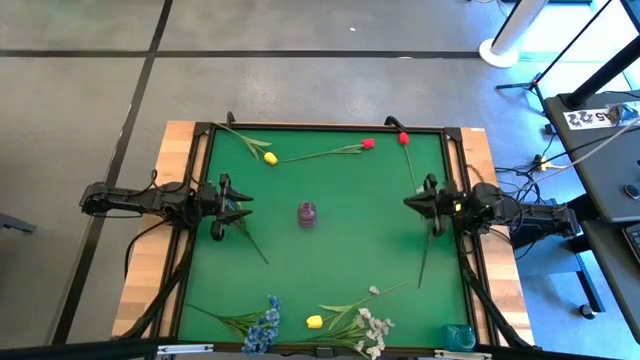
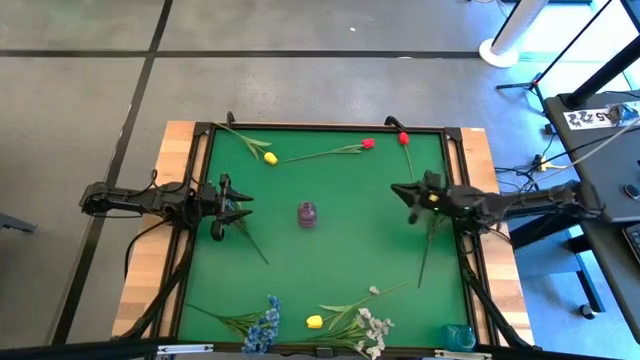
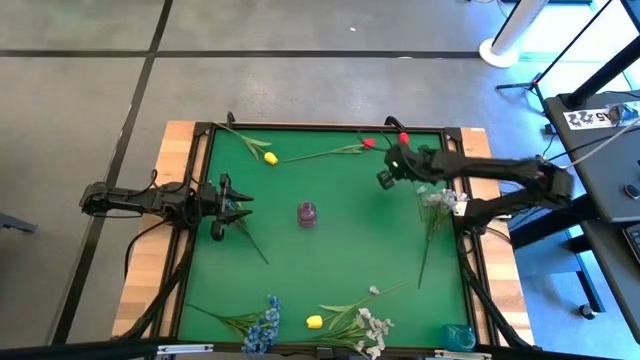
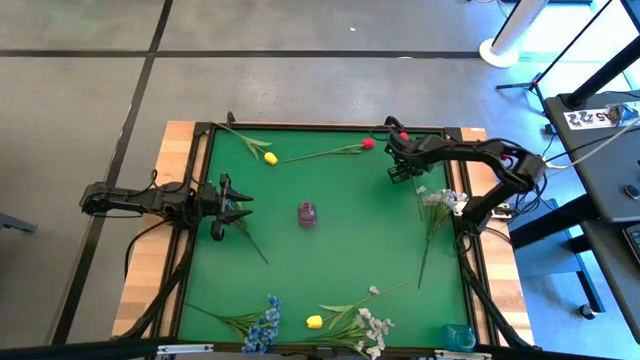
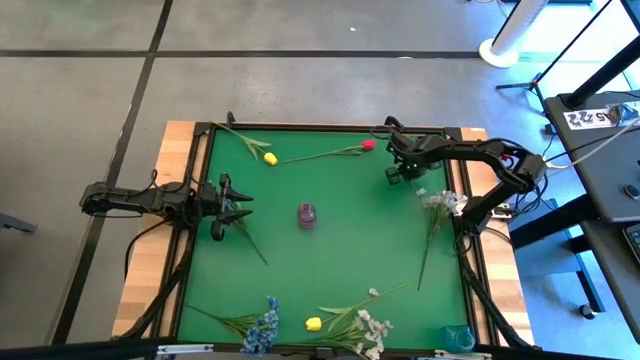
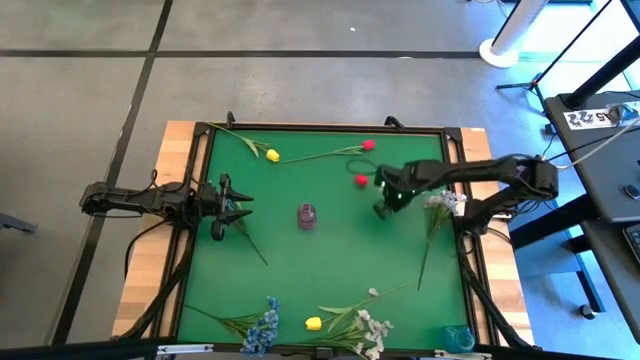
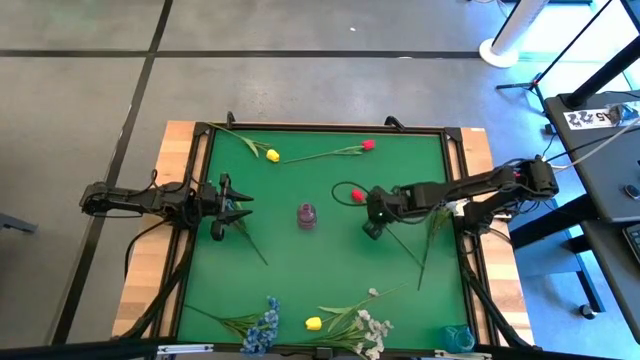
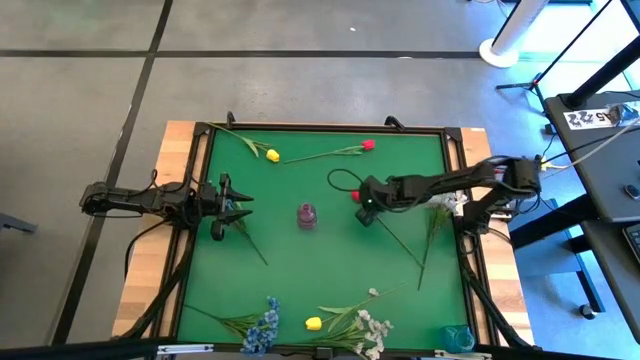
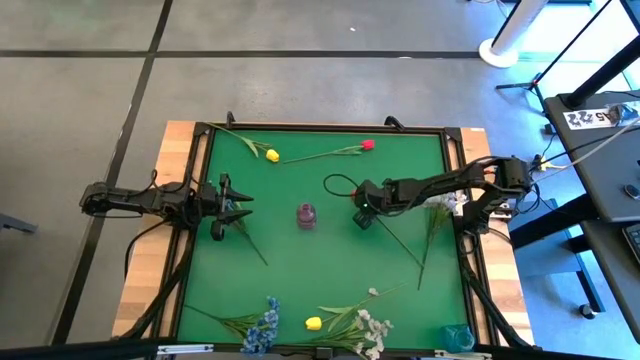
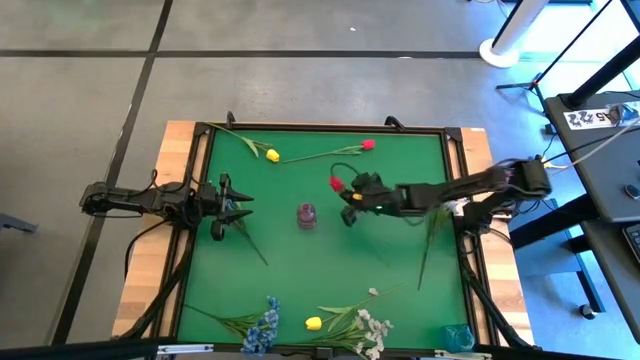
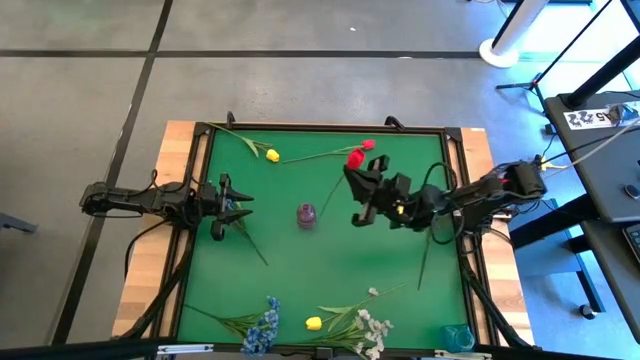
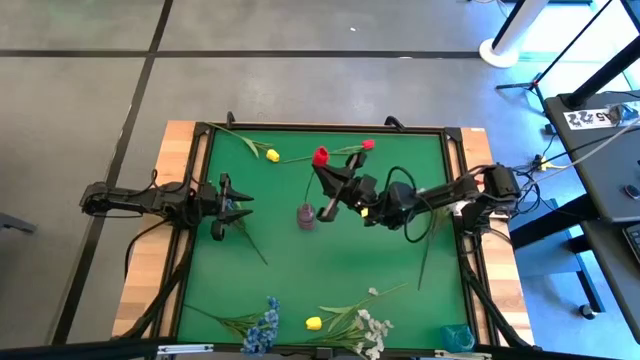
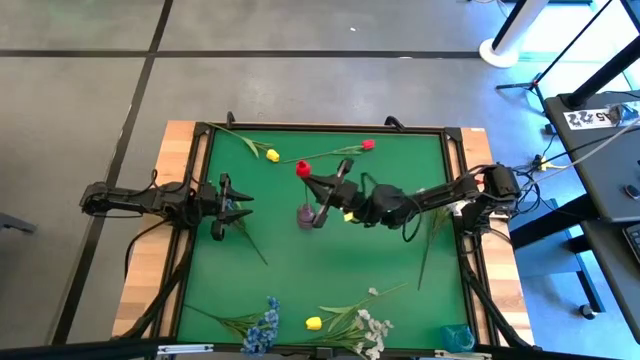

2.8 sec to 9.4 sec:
Task: Sort flowers into vase by color
Put the red tulip into the purple vase

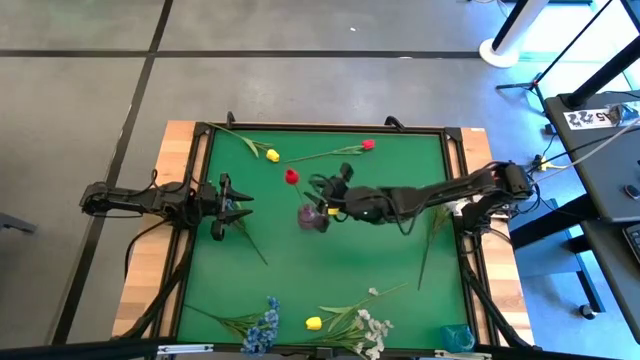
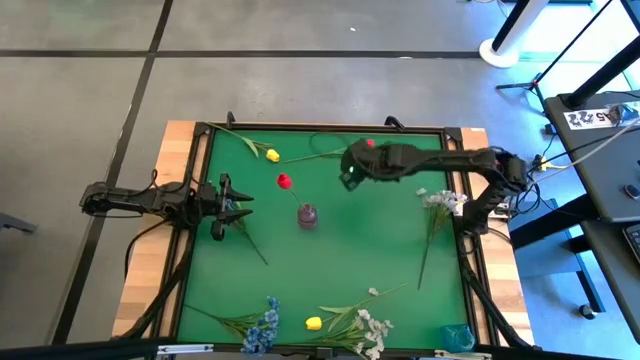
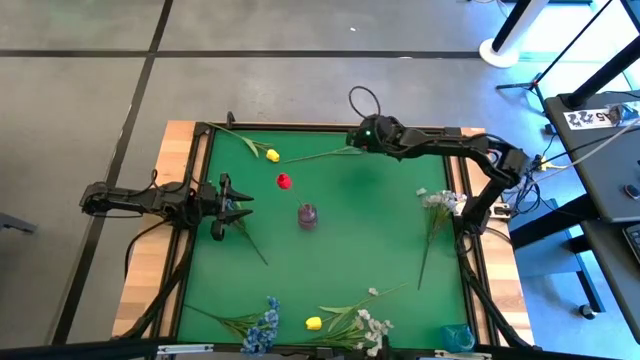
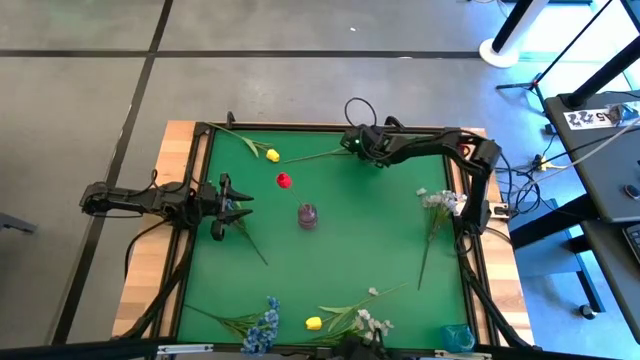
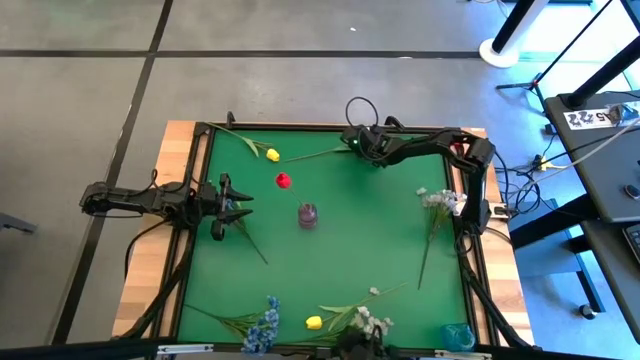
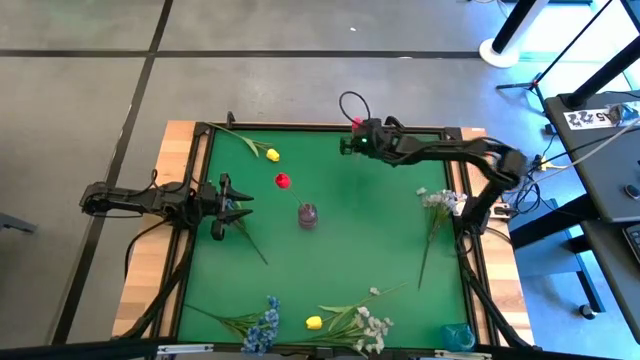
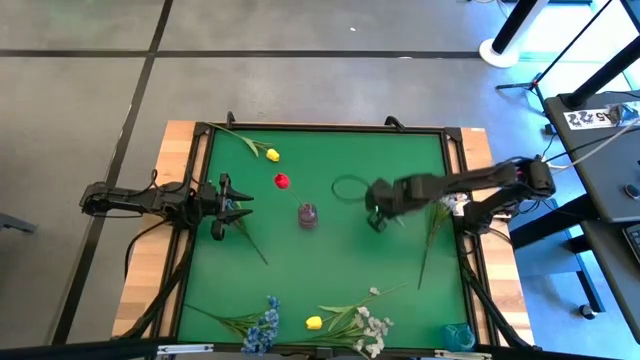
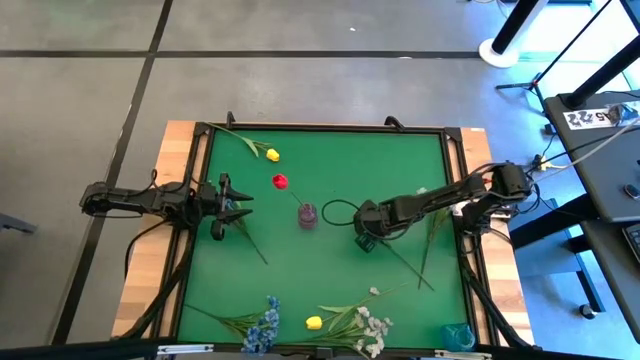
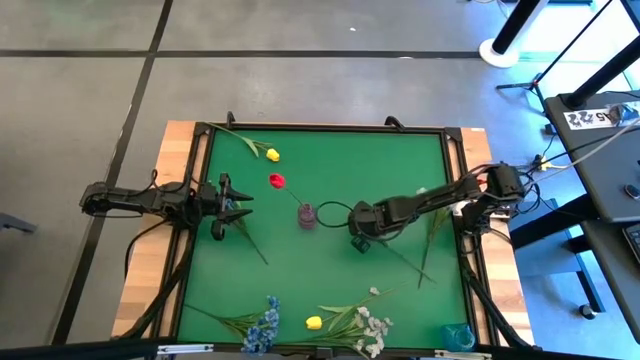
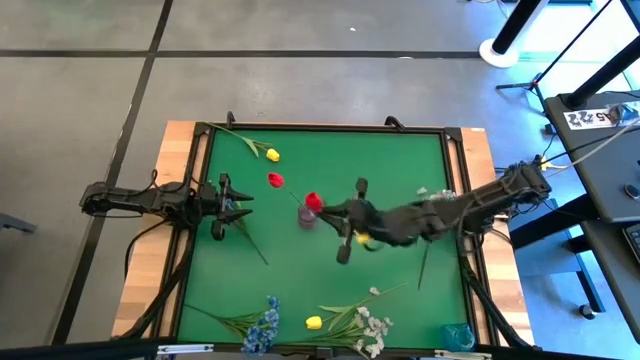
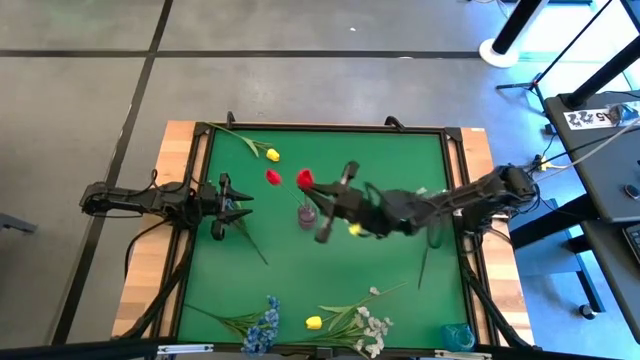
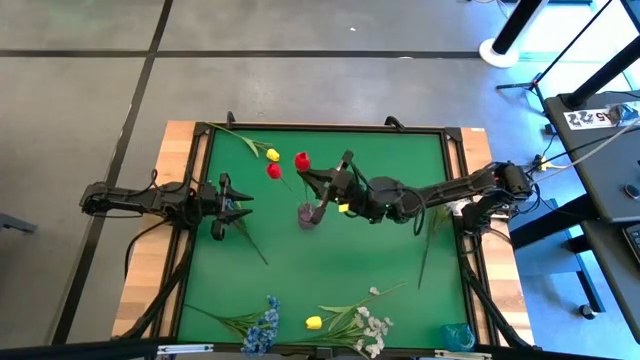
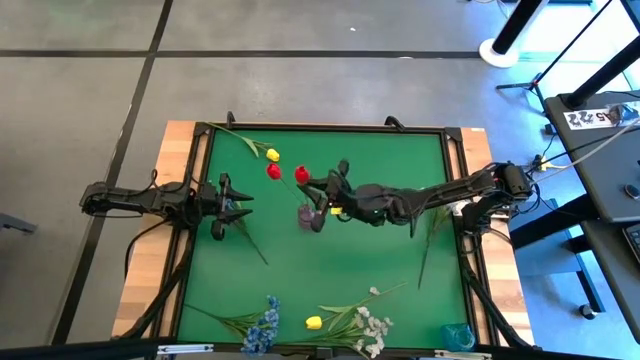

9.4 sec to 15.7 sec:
Put the red tulip into the purple vase

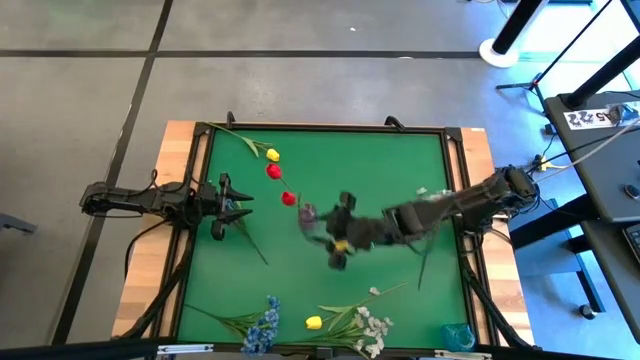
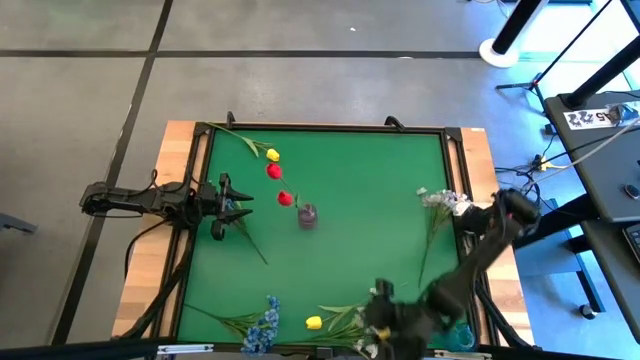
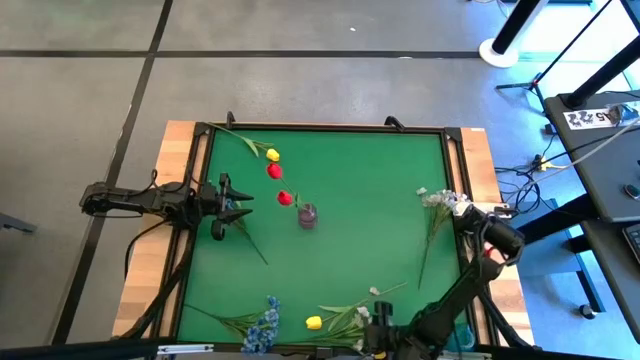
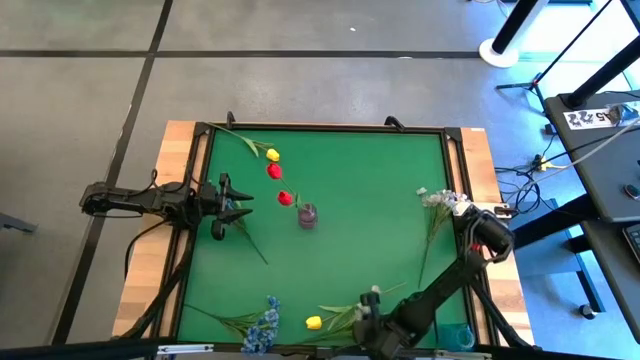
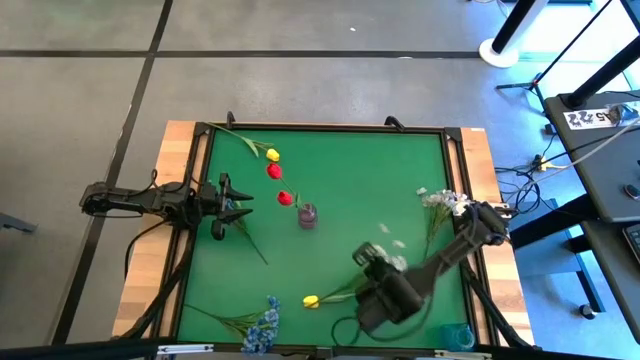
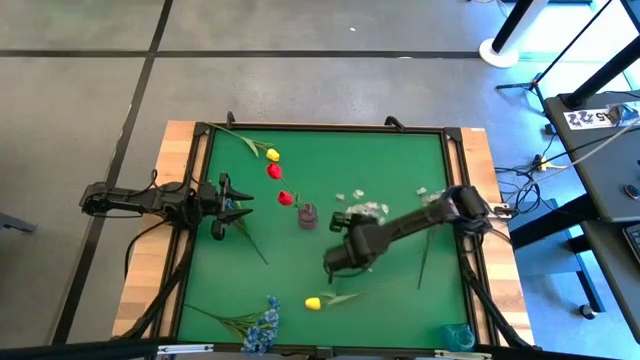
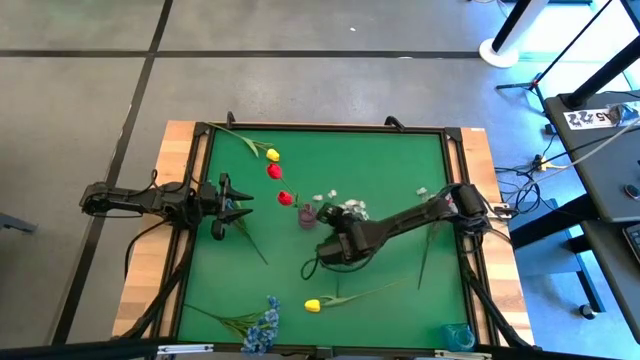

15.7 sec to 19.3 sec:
Move the white flowers to the center of the table

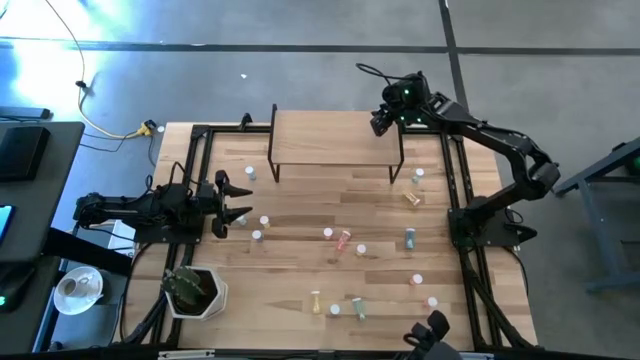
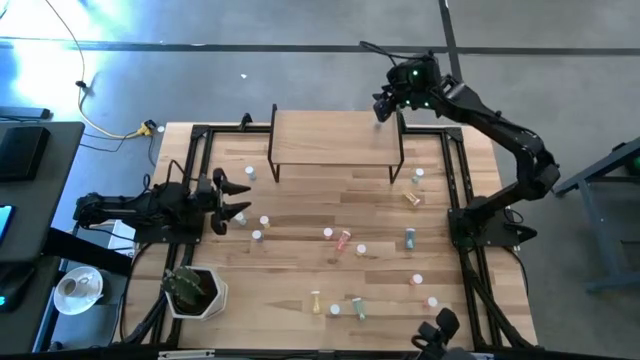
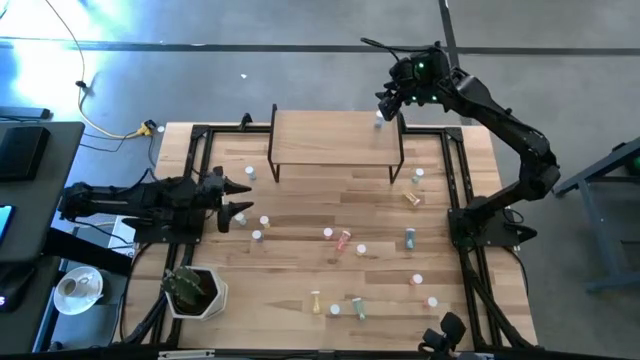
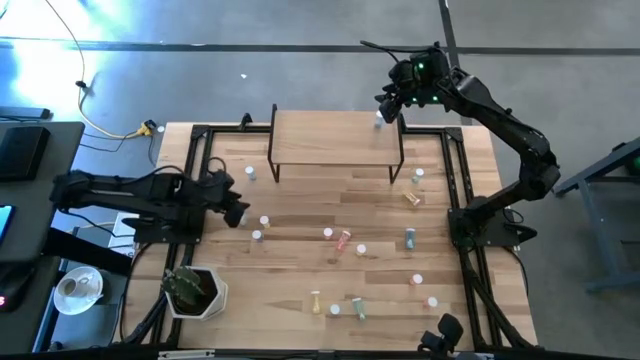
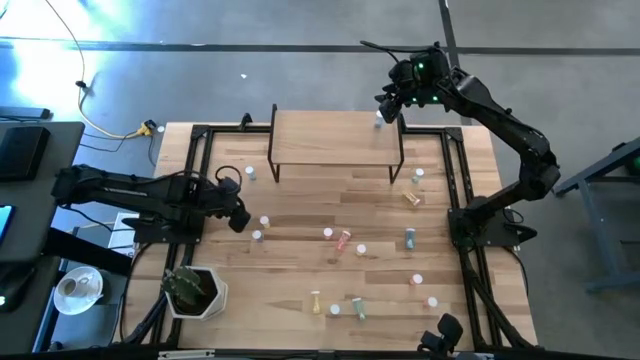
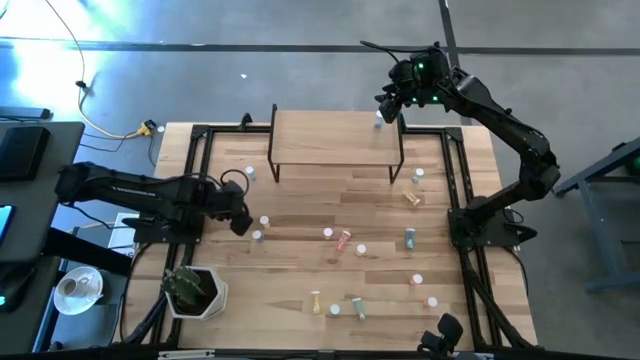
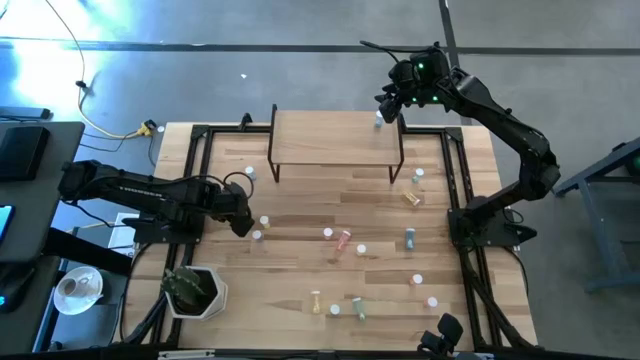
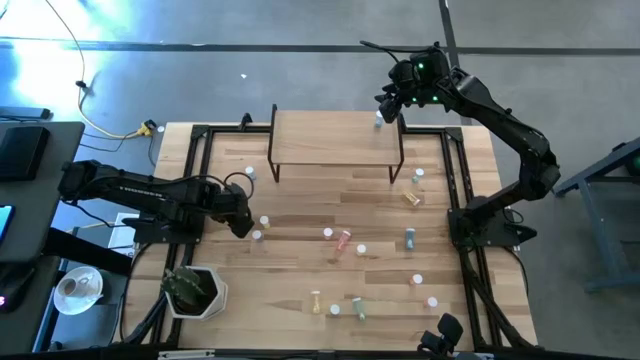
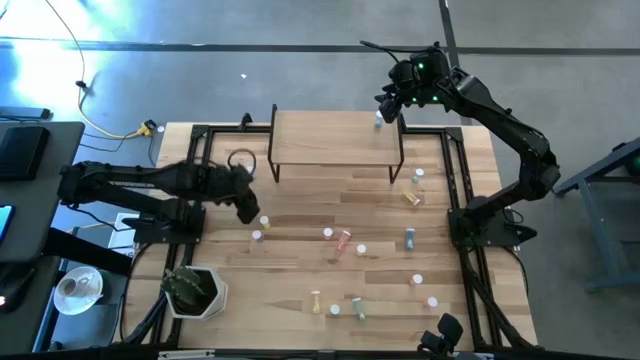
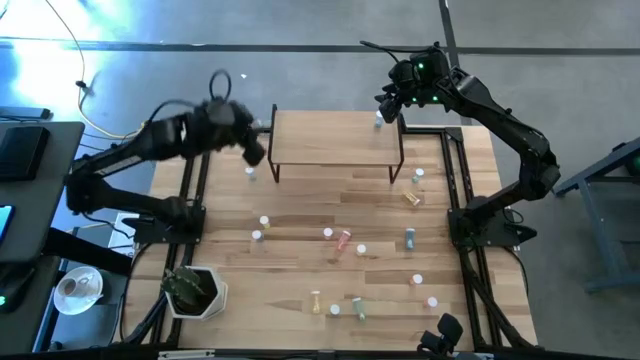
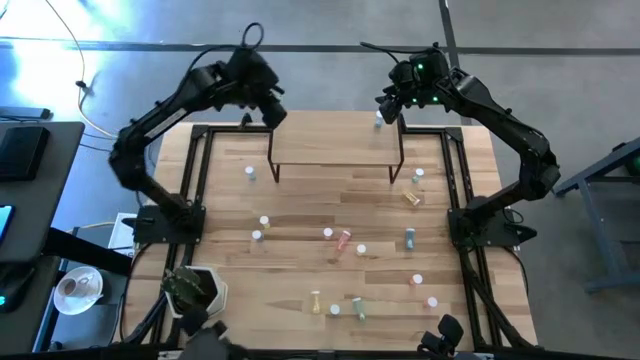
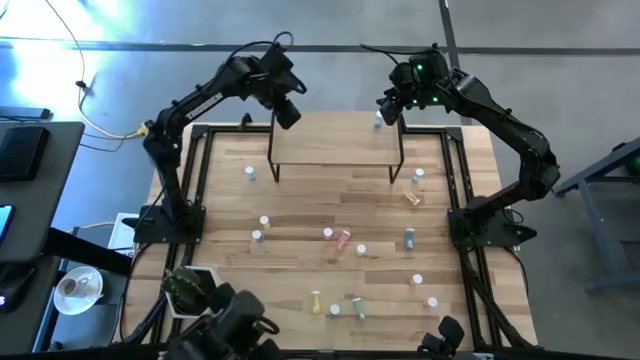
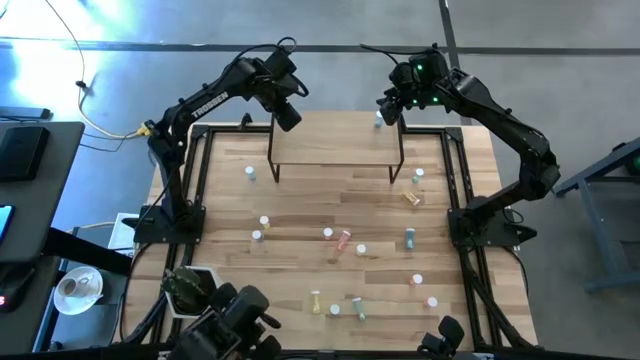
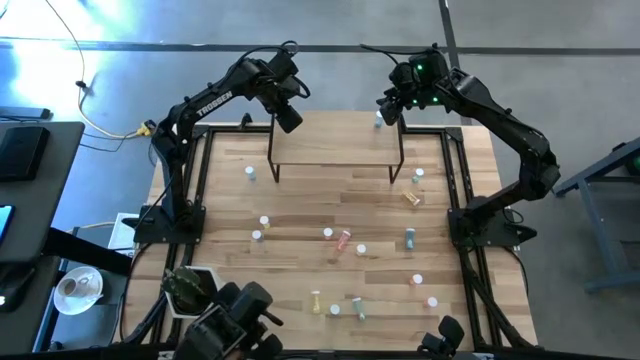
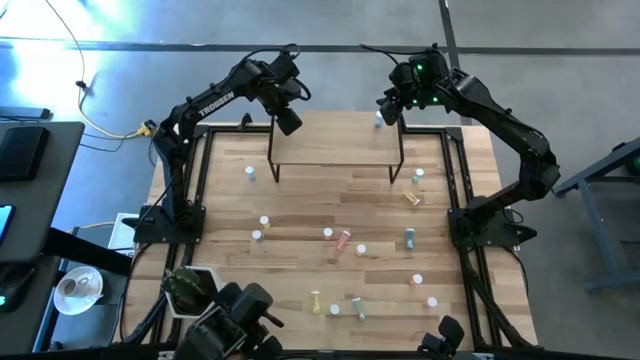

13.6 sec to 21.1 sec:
Task: Pick and place medicine bottles onto shelf by color
Put the green pill bottle on the shelf
